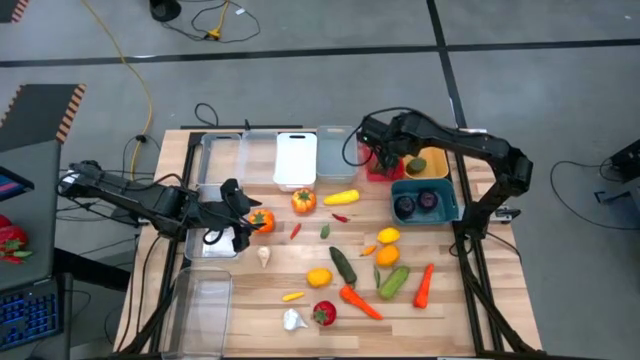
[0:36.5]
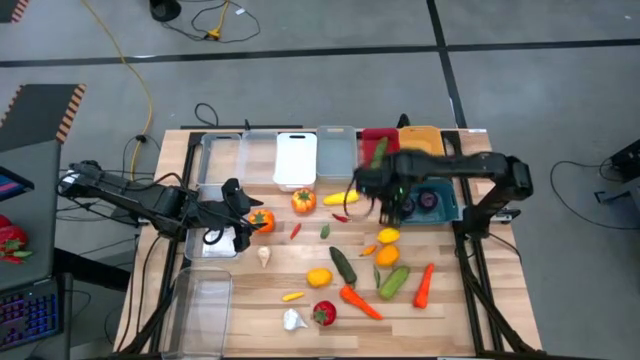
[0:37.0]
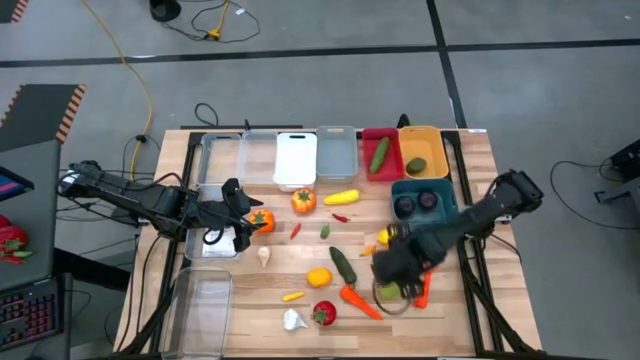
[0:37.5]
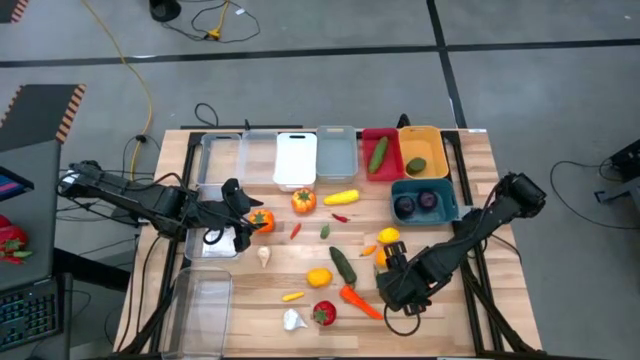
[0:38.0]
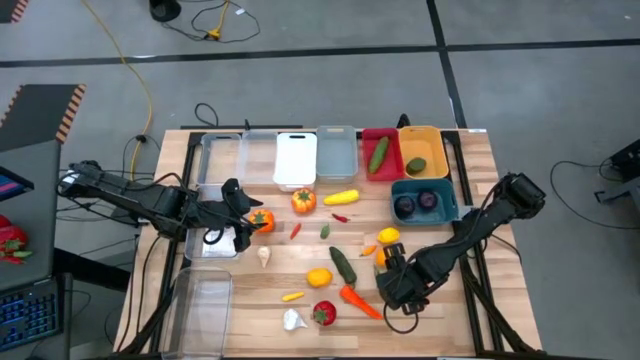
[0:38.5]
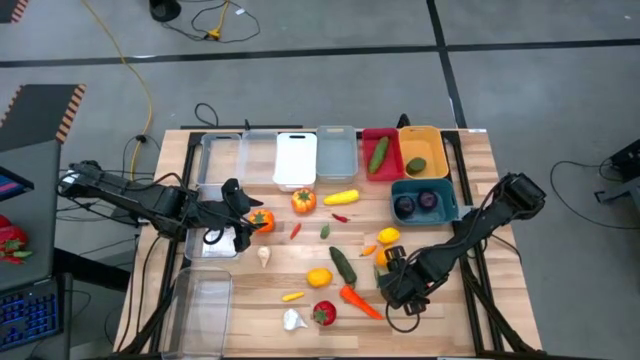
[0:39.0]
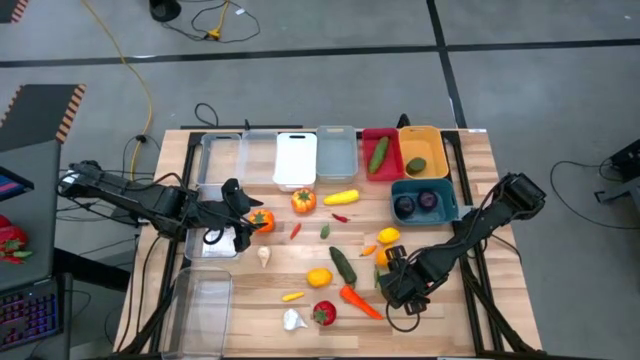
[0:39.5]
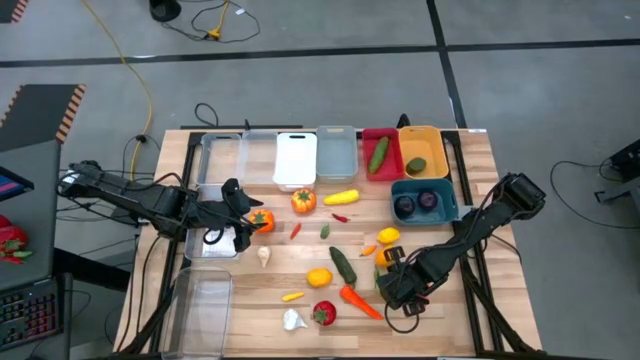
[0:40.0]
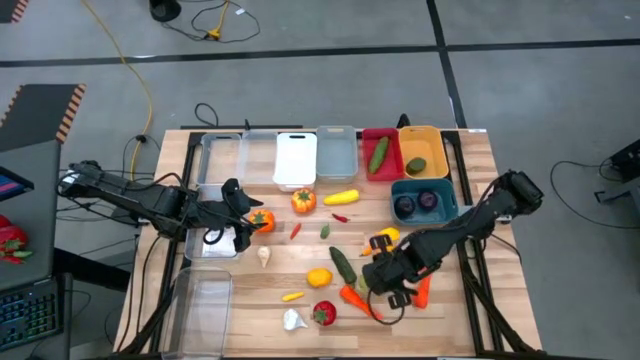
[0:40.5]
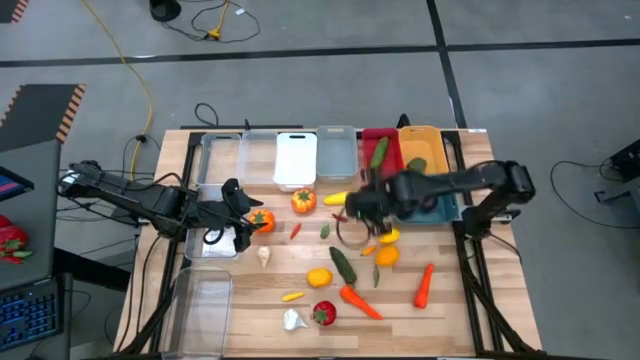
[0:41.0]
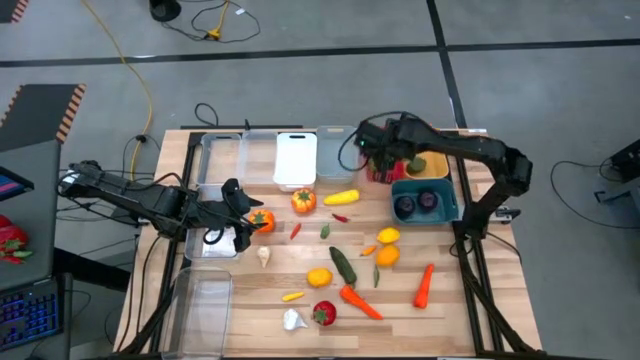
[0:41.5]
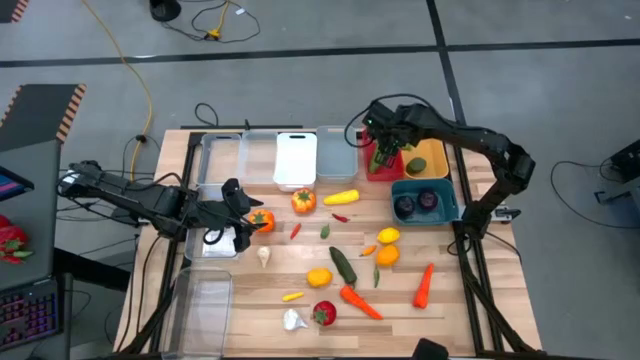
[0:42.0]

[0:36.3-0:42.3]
Task: Sort produce into baskets
Put the cucumber into the red bin

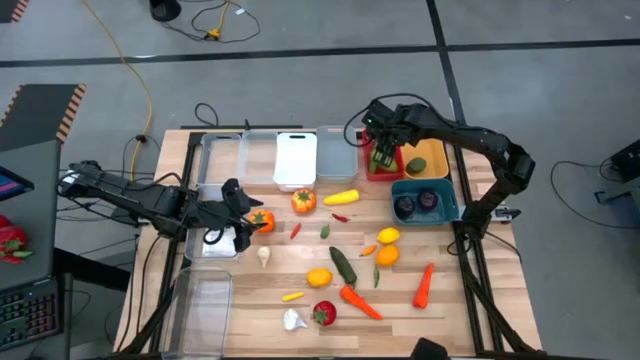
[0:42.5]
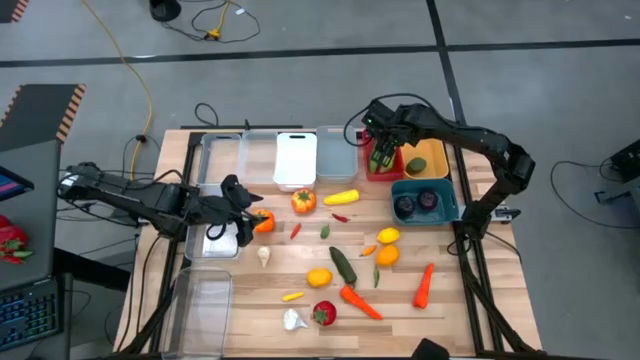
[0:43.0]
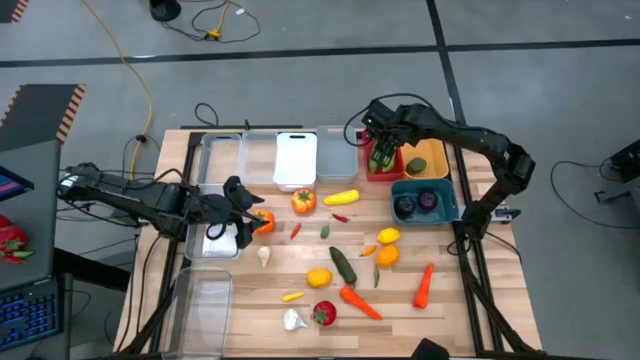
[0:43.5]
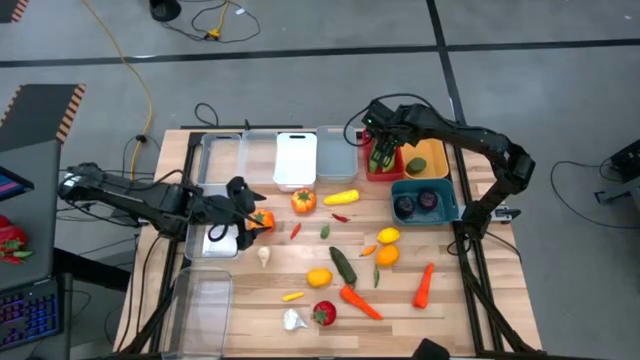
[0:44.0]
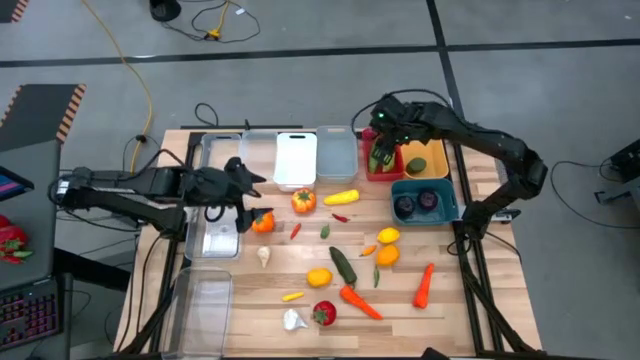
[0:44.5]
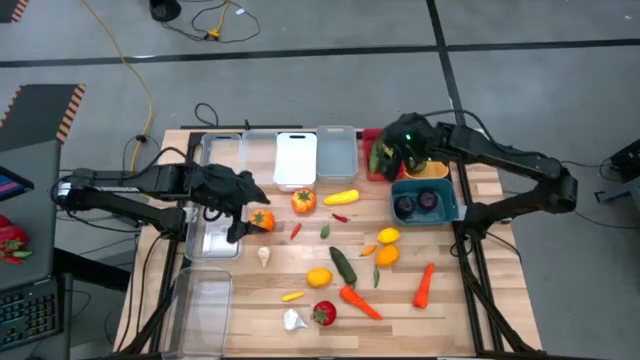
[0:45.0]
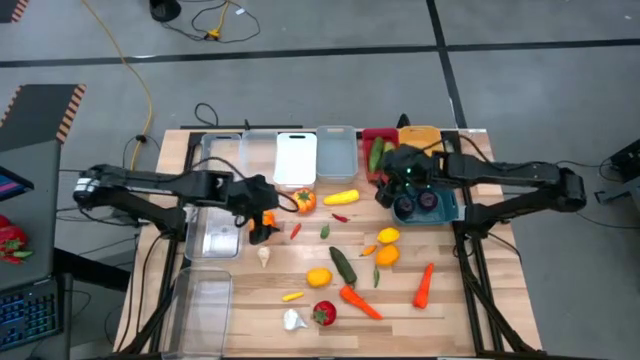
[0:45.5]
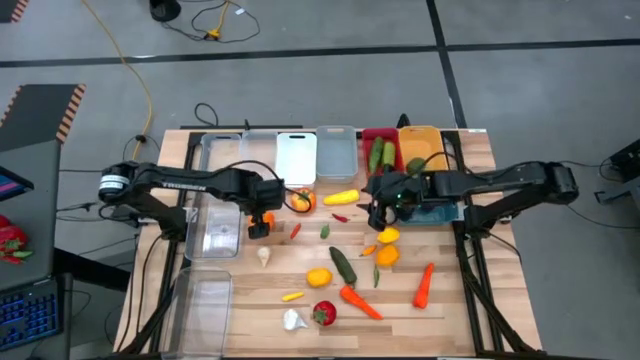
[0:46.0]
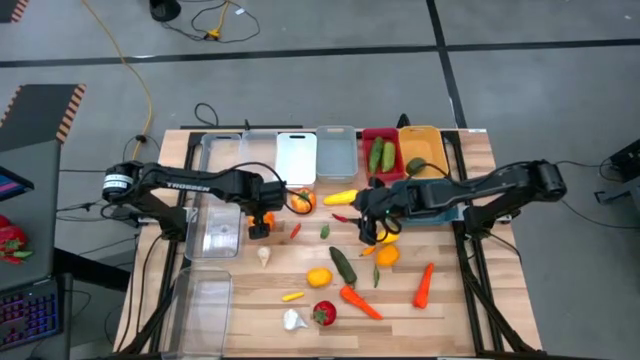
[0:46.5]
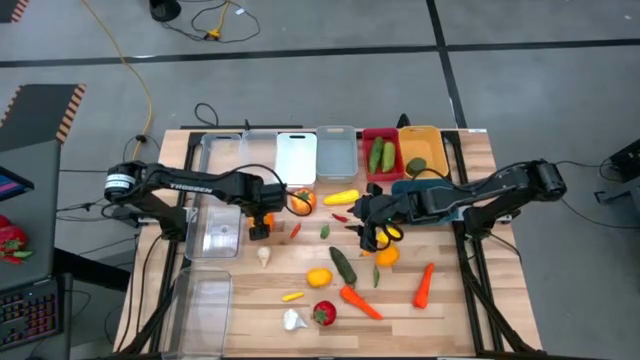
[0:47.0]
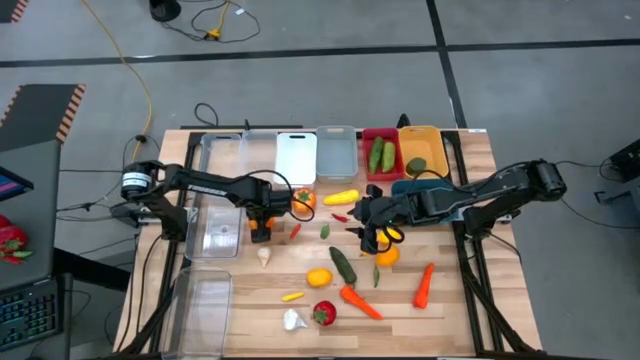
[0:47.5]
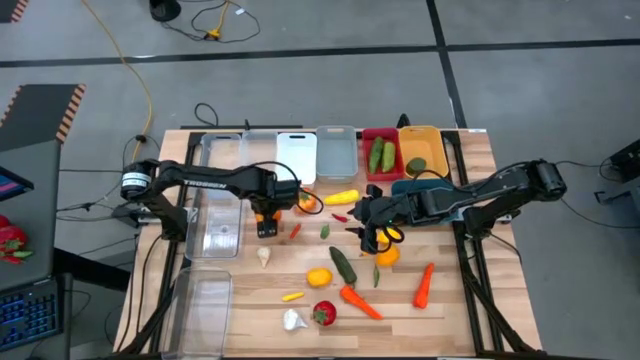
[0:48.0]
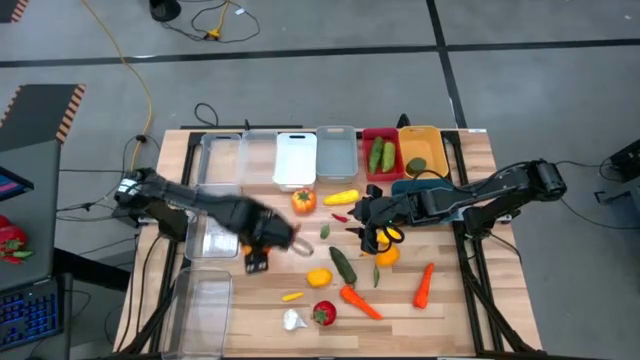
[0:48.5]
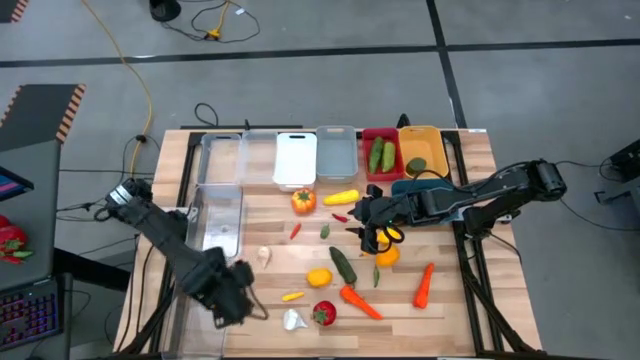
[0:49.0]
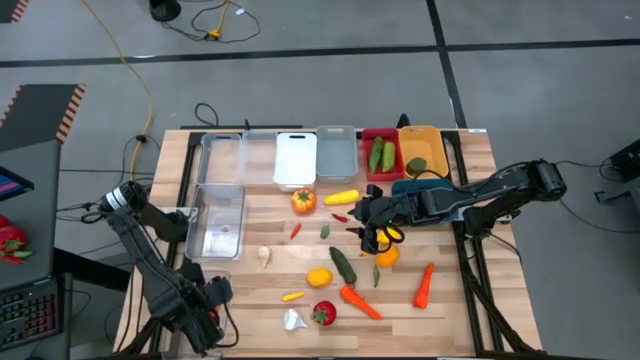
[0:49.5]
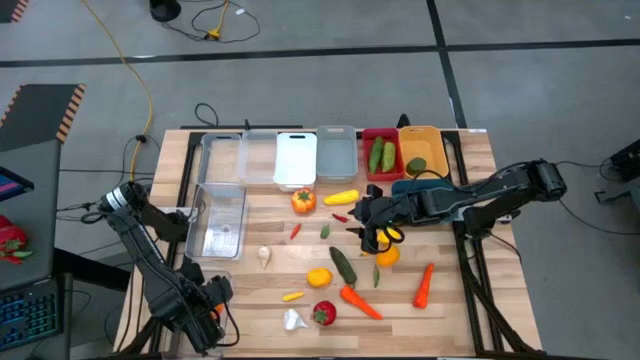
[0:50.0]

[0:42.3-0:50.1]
Put the middle tomato into the bottom big transparent bin

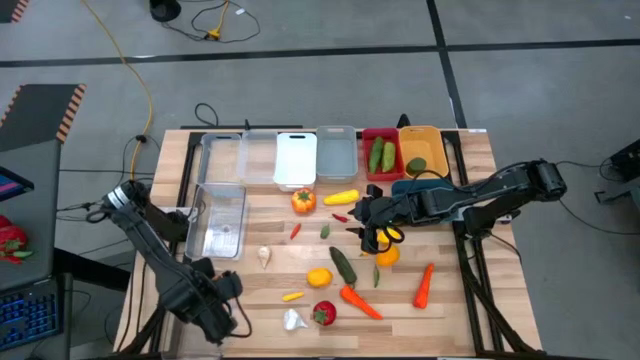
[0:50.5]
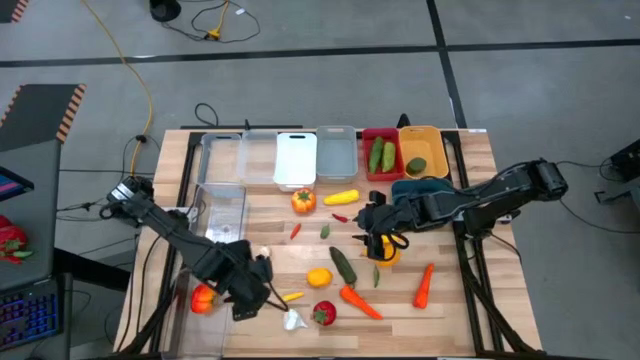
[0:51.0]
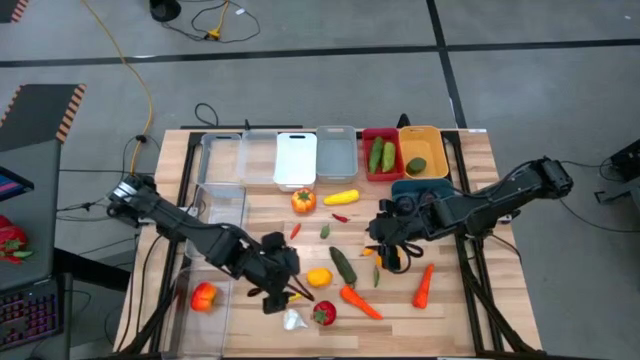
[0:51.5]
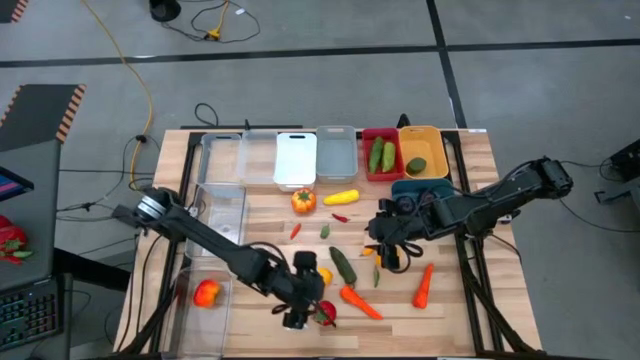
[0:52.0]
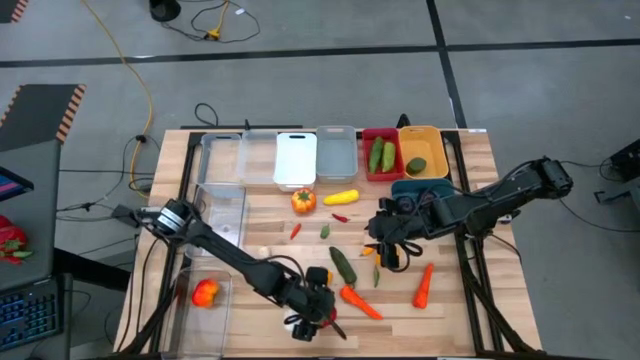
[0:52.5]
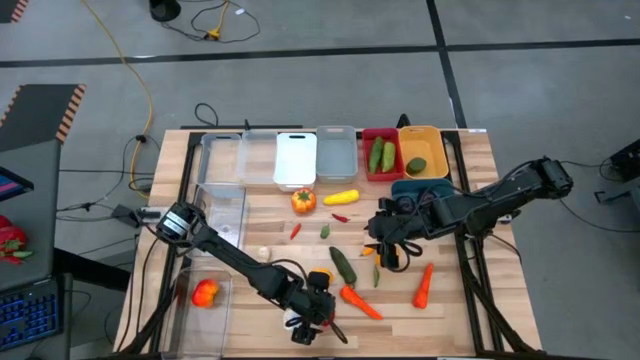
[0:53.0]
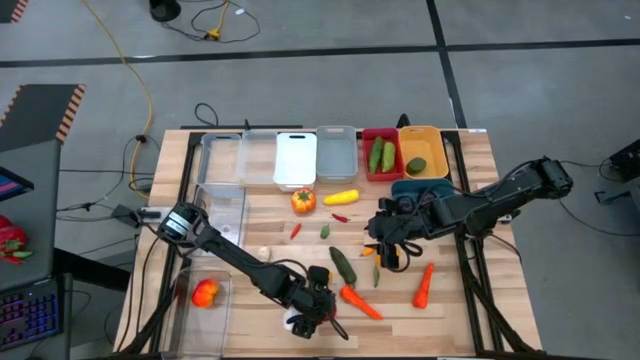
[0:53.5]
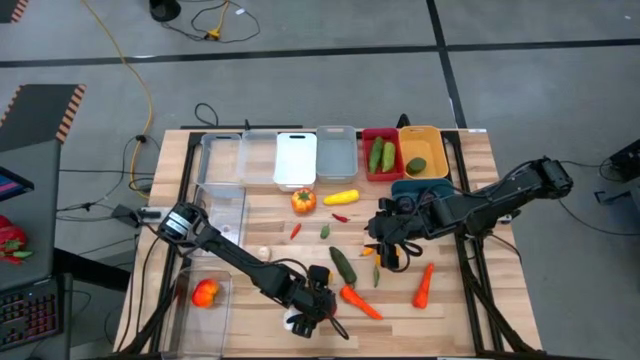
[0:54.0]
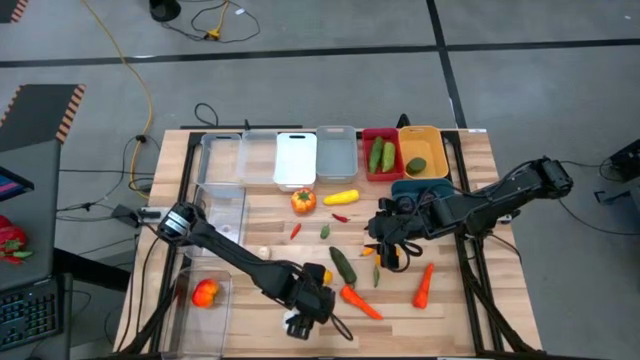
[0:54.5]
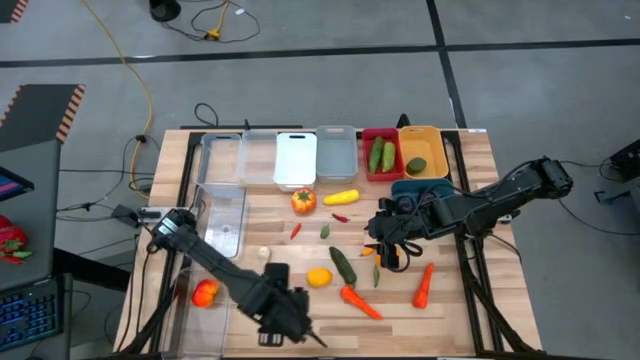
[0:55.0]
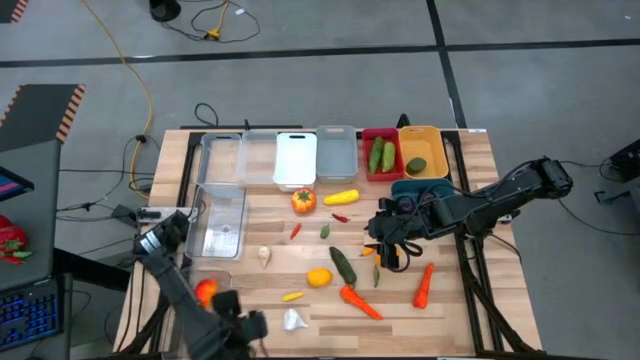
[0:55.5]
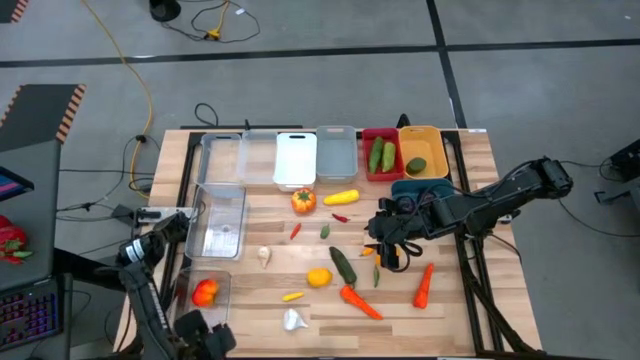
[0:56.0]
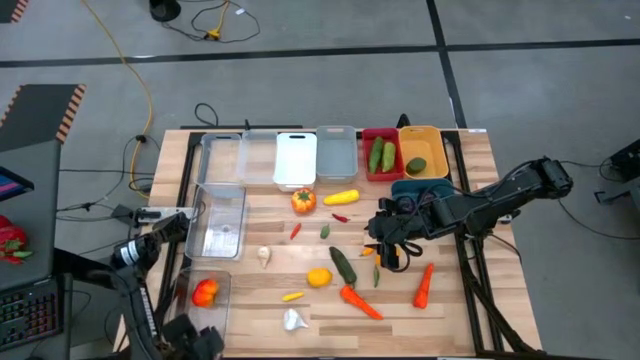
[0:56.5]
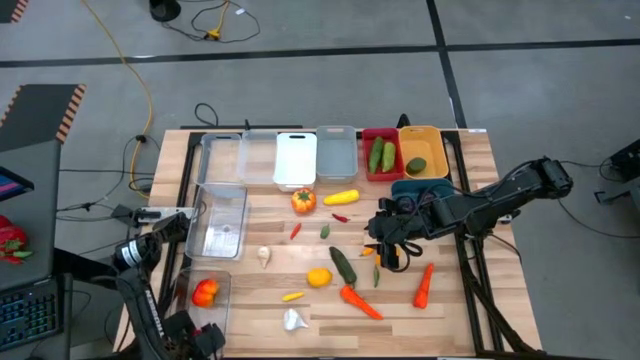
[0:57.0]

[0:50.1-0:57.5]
Put the bottom tomato into the bottom big transparent bin
